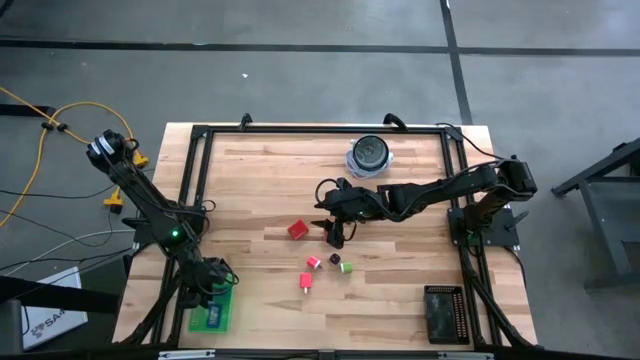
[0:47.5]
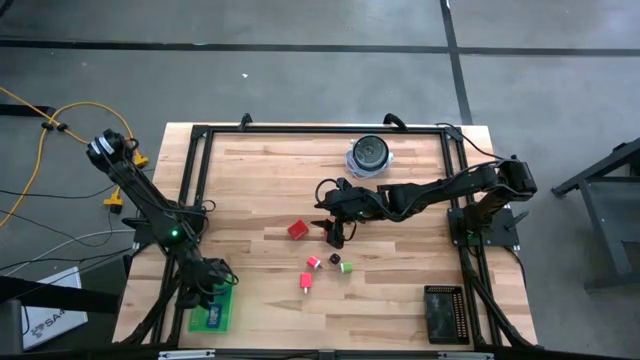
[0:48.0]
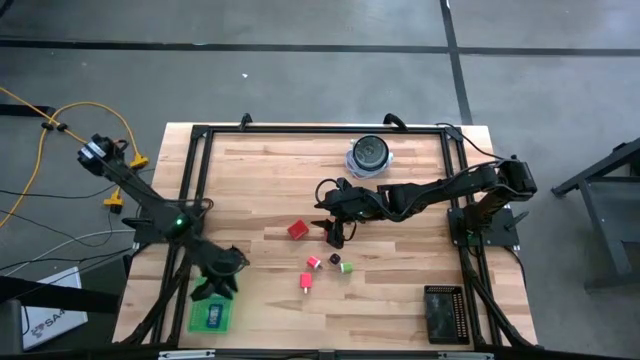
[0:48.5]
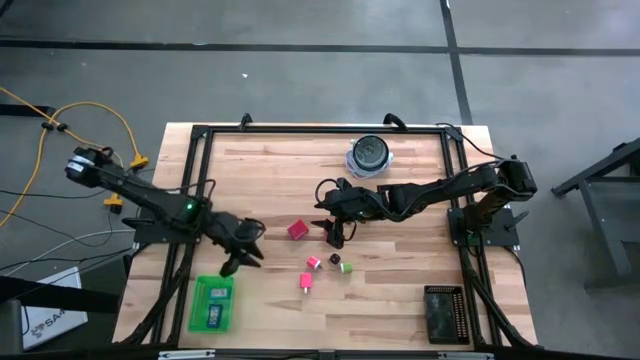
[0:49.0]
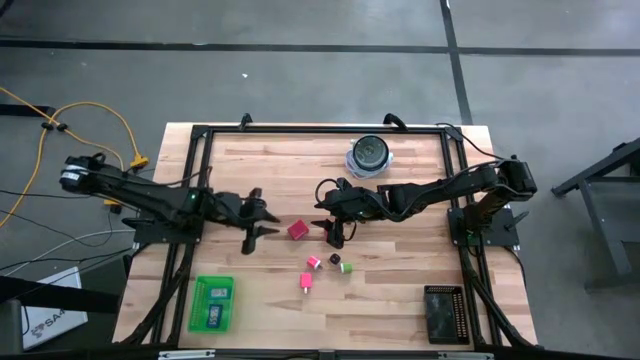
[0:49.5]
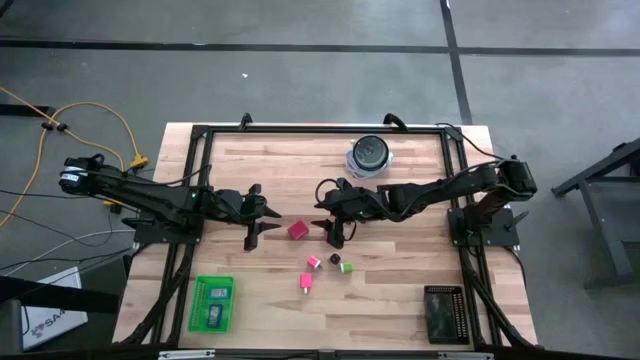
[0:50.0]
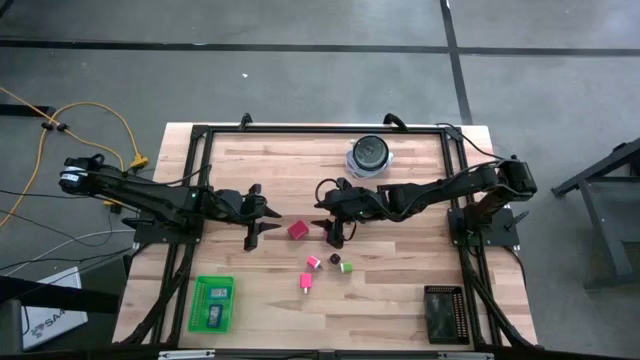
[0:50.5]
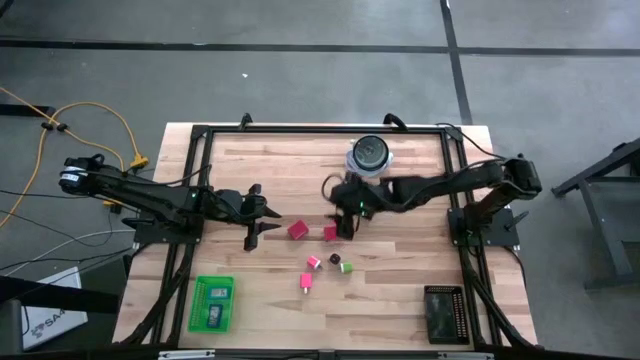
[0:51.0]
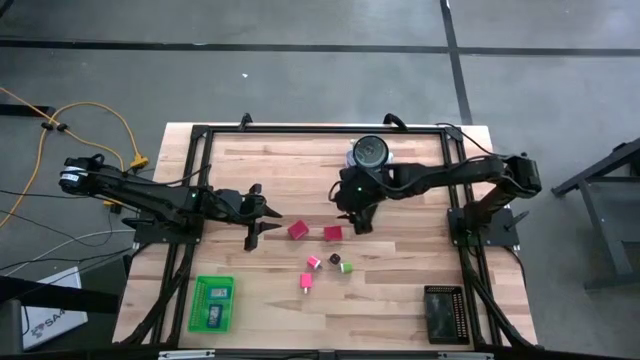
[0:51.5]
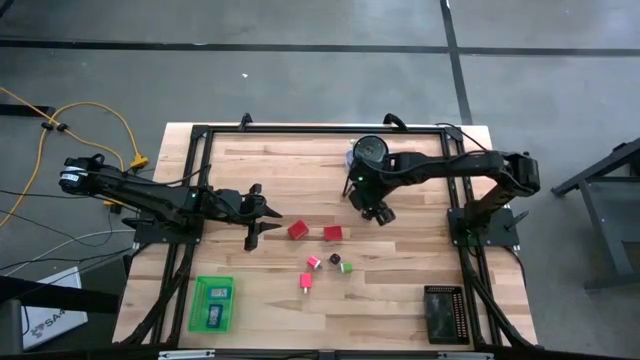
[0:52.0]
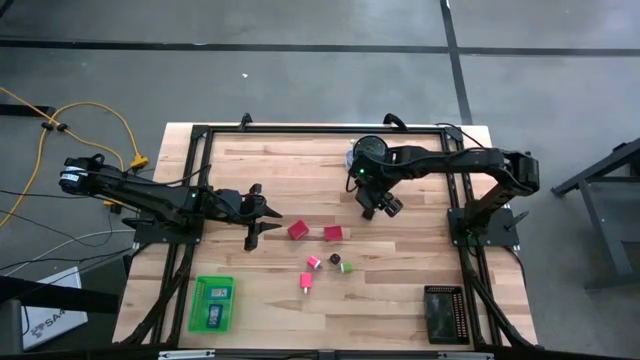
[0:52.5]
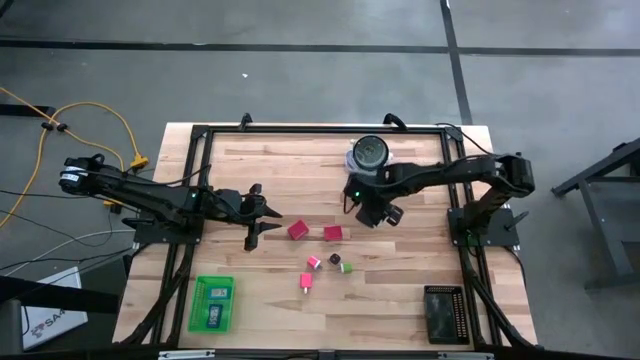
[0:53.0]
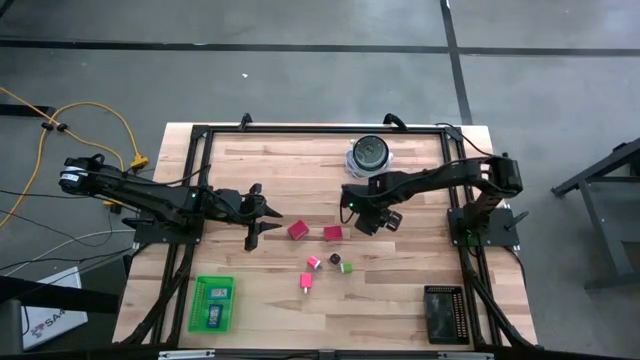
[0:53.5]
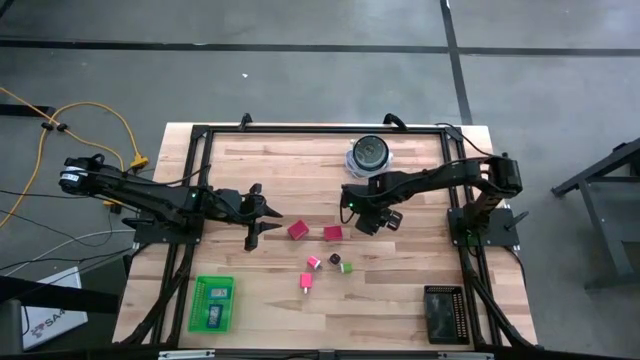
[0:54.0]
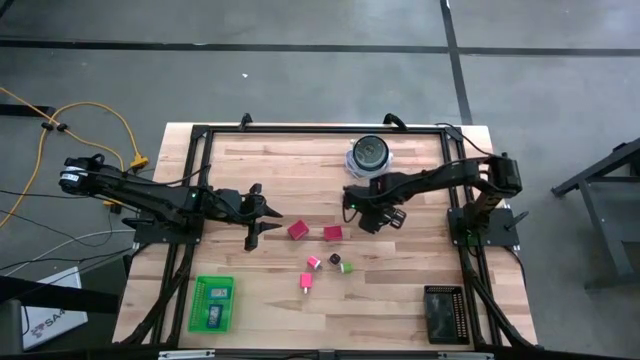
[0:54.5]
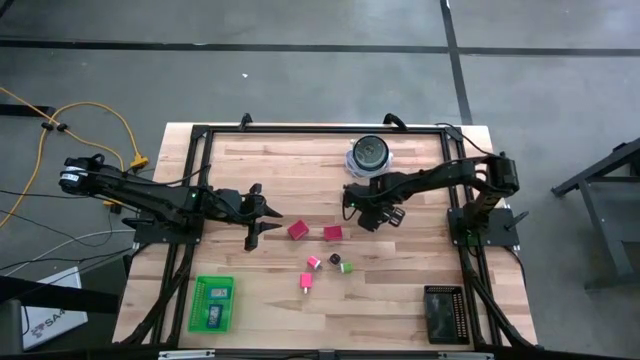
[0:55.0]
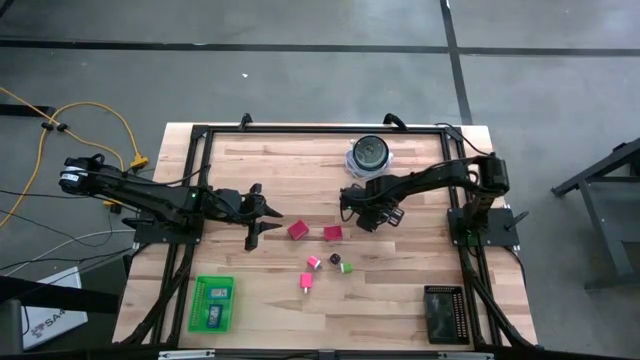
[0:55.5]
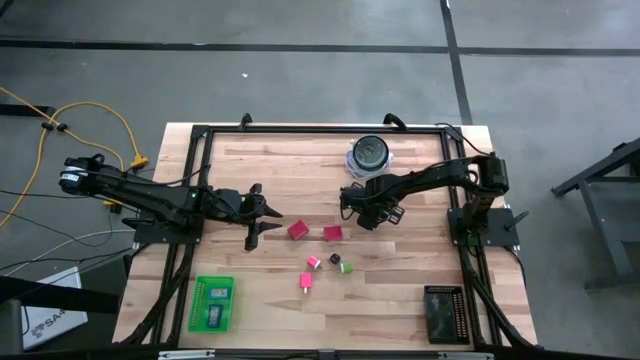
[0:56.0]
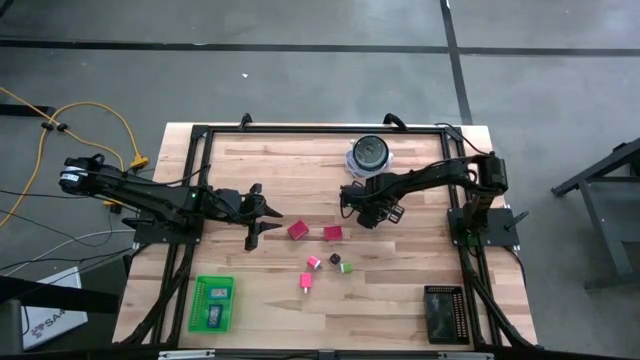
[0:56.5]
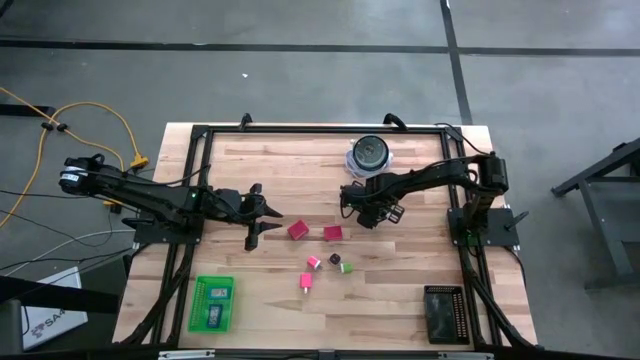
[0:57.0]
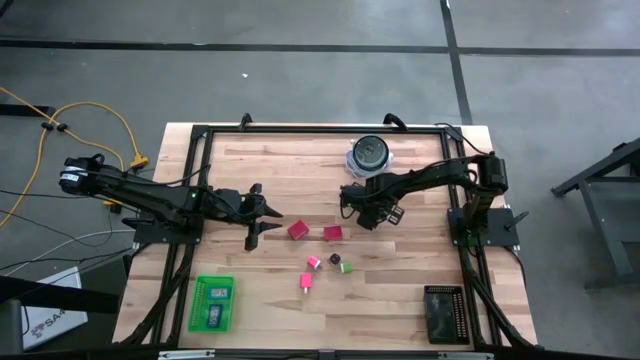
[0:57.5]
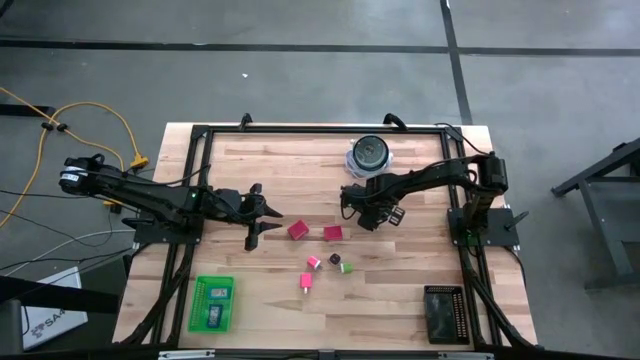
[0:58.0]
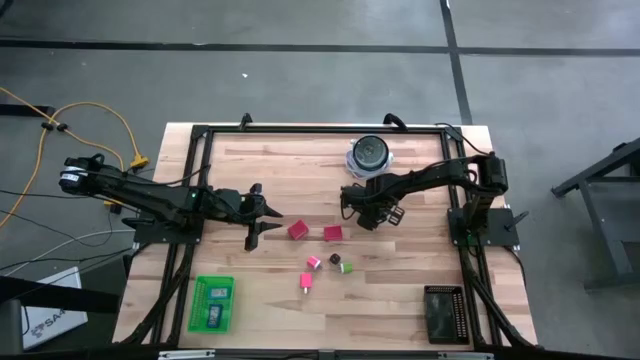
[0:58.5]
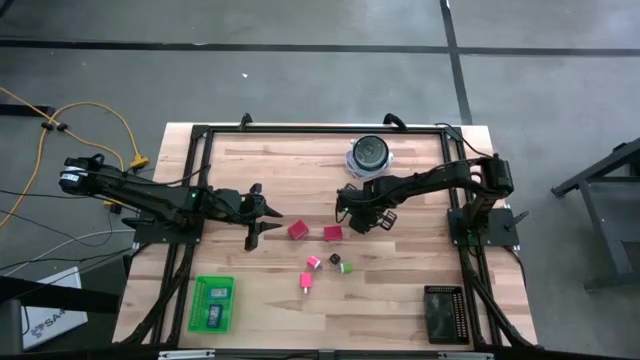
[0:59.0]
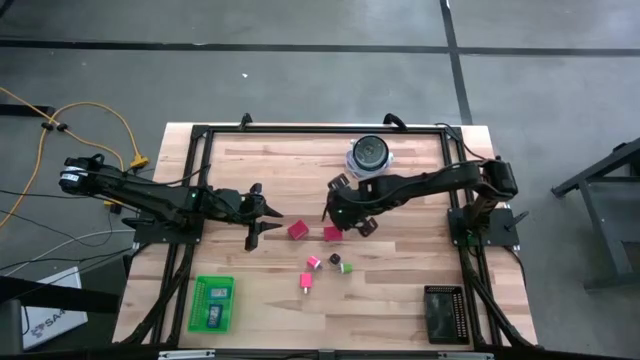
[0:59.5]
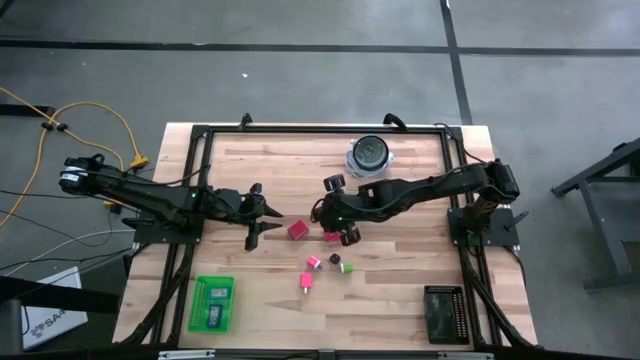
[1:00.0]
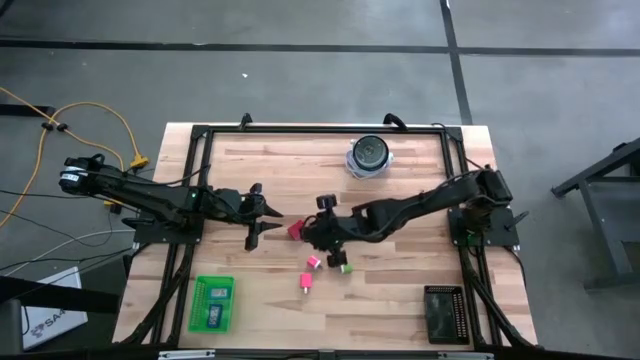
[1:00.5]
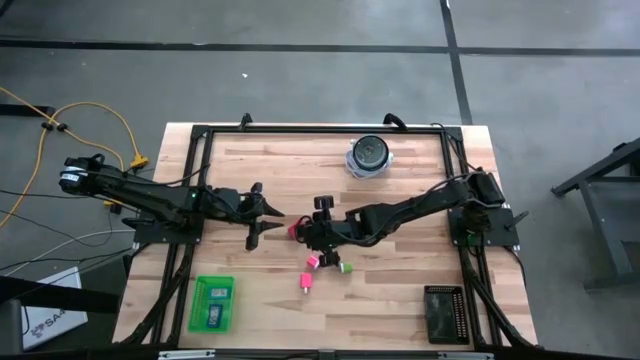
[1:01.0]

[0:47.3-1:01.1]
Task: Pick & Place Office items
Put the black digital timer into the green bin

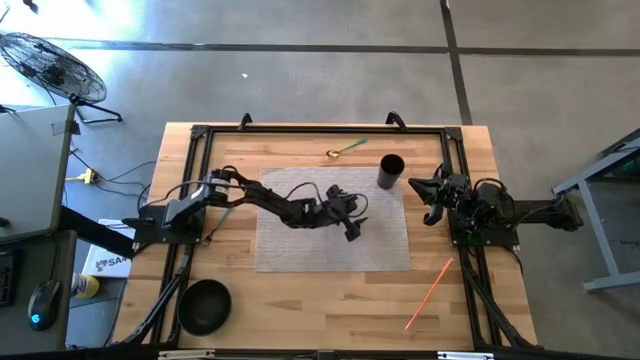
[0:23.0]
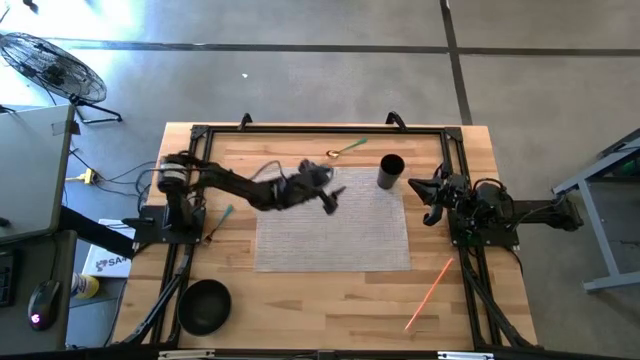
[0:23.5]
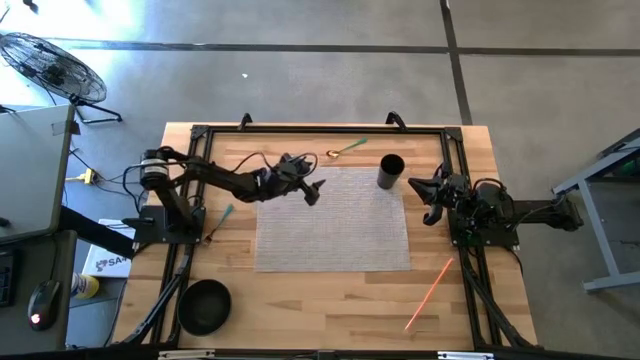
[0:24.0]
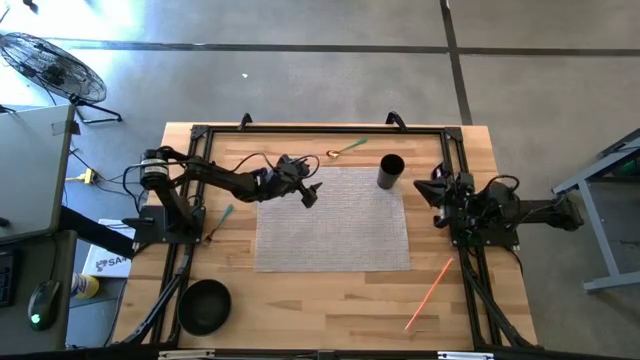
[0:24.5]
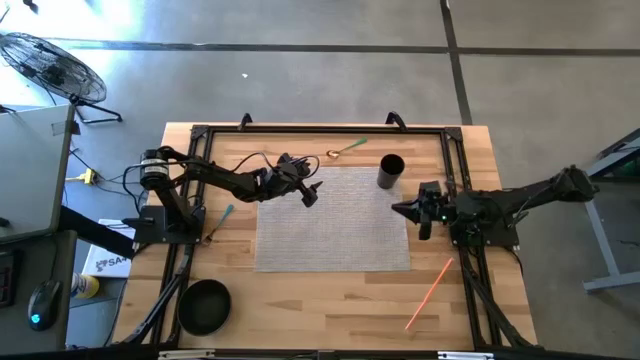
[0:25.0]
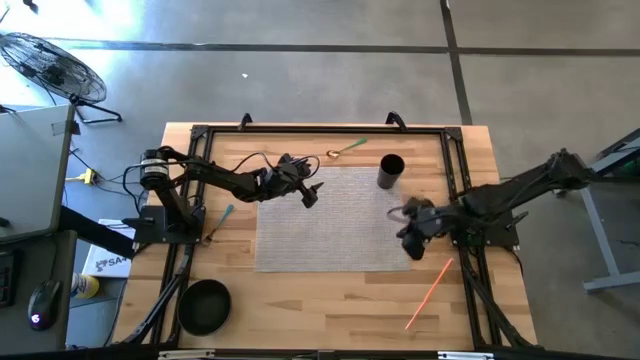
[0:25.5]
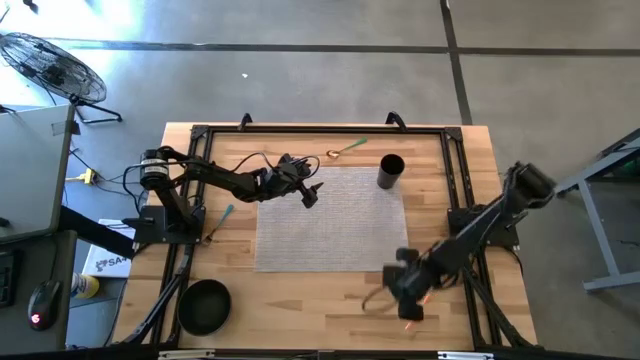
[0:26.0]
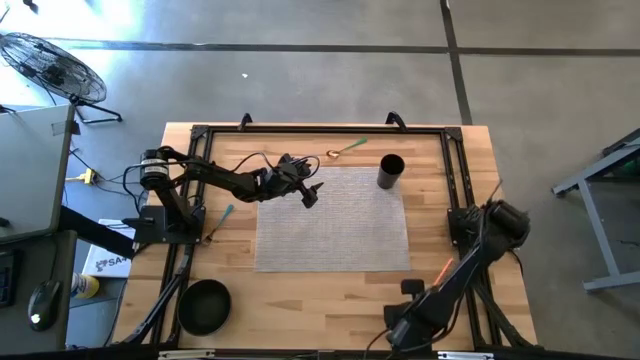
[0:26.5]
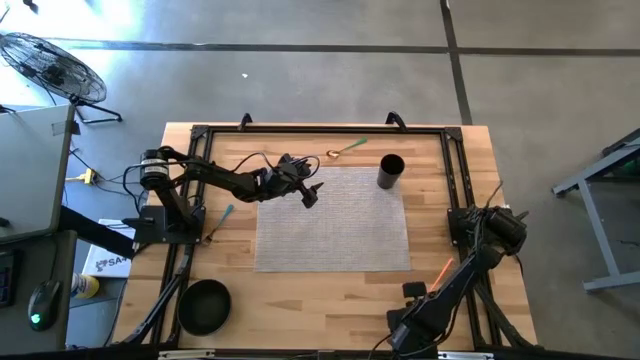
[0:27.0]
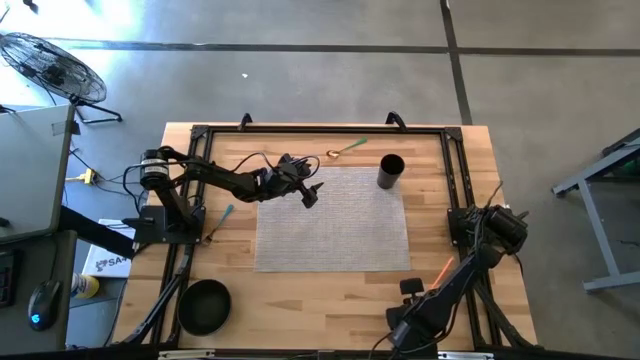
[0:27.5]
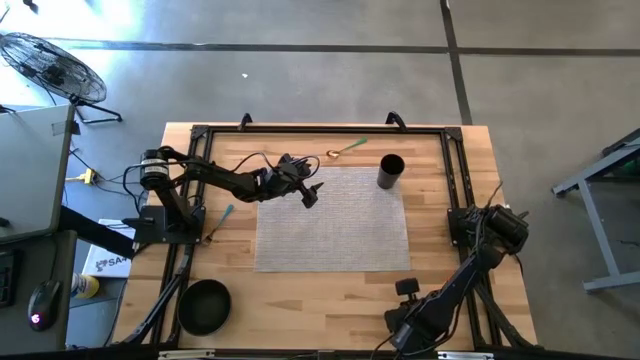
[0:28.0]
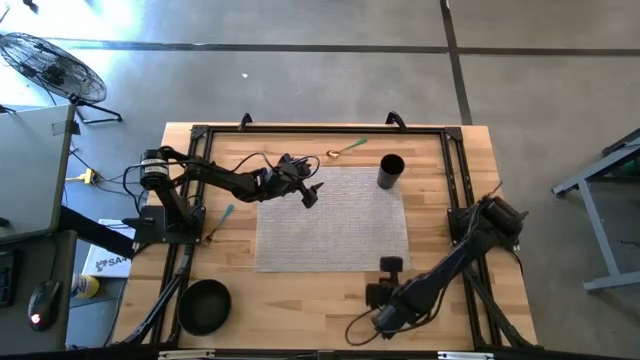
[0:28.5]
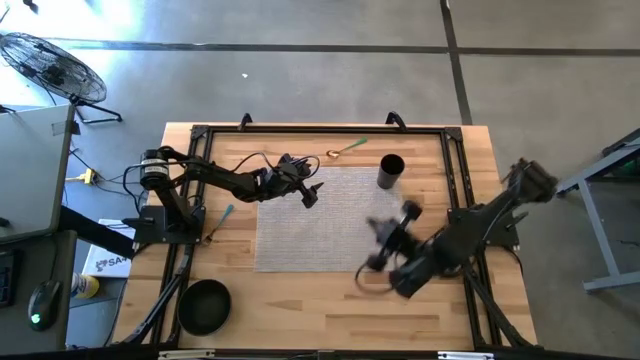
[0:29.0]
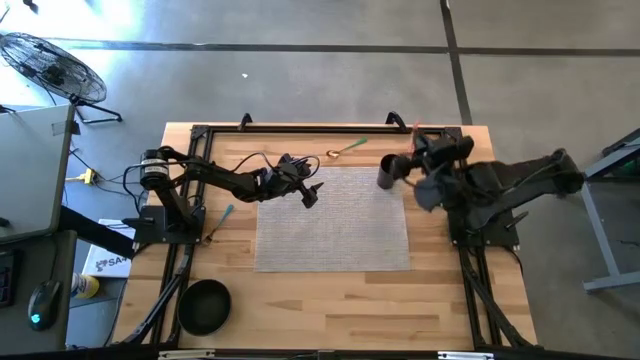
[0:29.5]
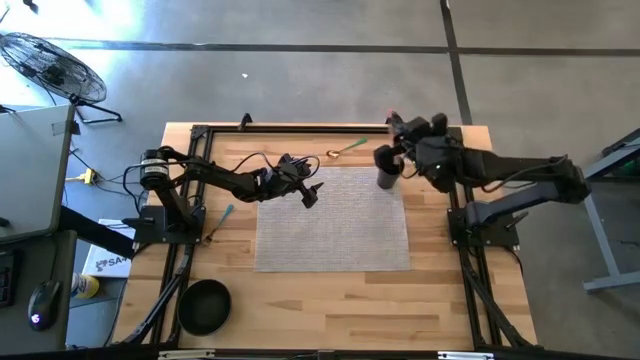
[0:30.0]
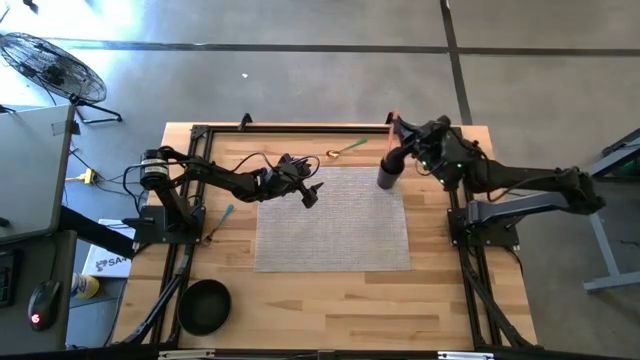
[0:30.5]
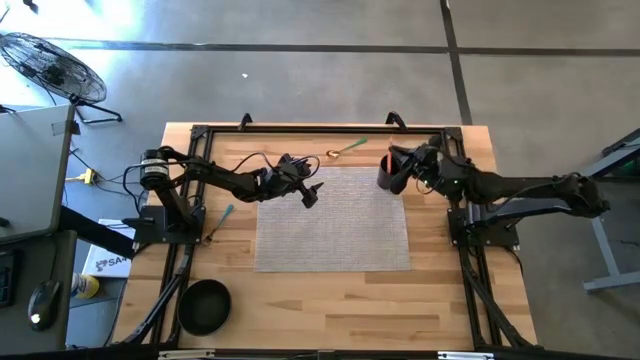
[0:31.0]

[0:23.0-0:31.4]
Task: Pick & Place Utensil
Put the orange straw into the black cup
